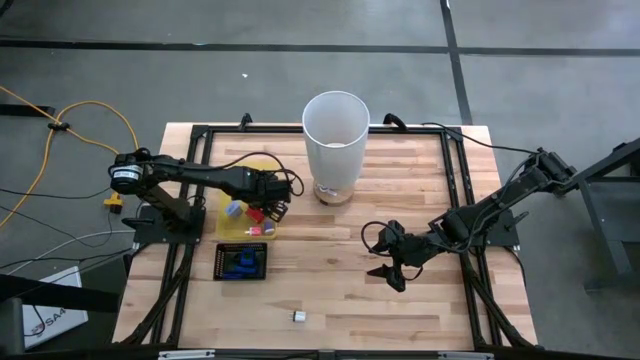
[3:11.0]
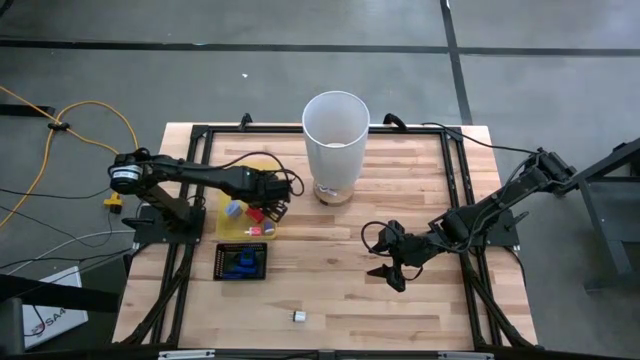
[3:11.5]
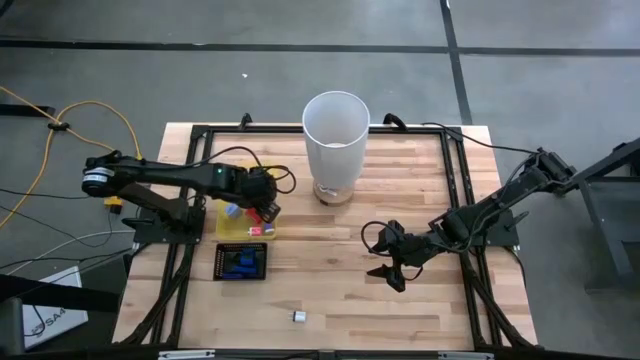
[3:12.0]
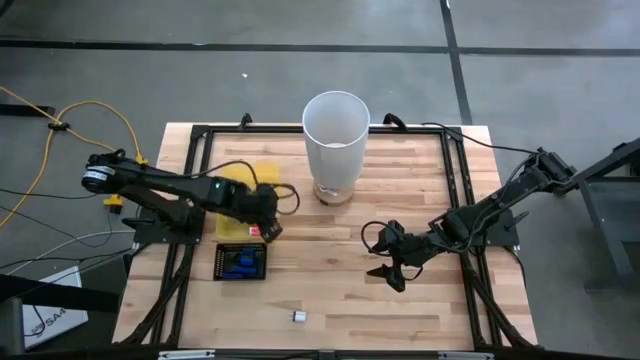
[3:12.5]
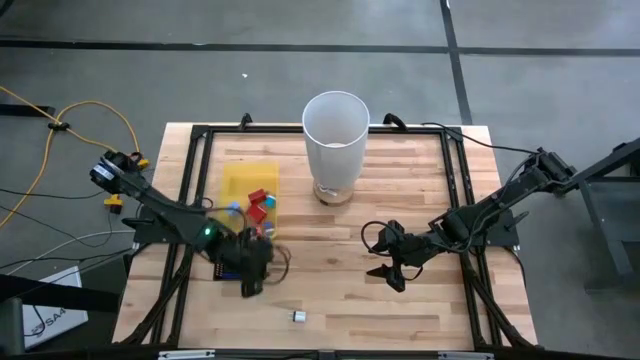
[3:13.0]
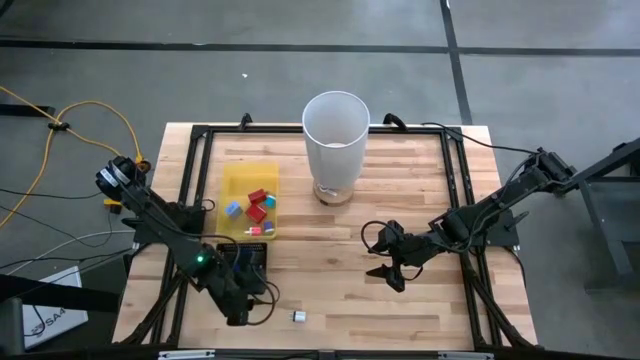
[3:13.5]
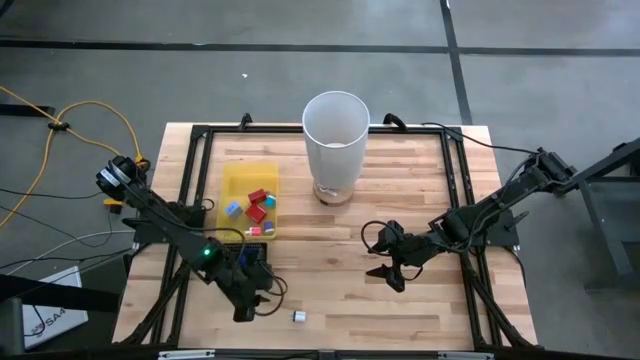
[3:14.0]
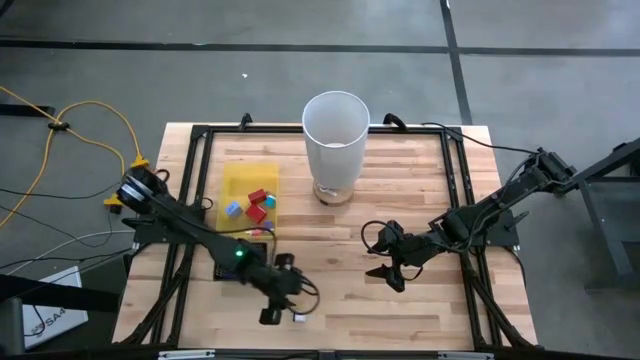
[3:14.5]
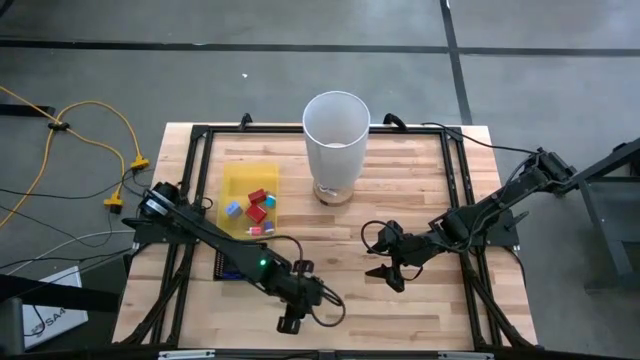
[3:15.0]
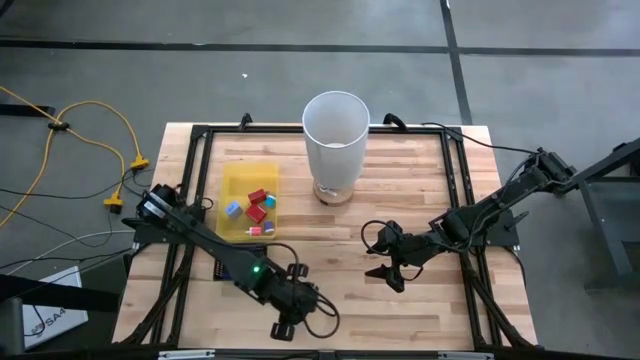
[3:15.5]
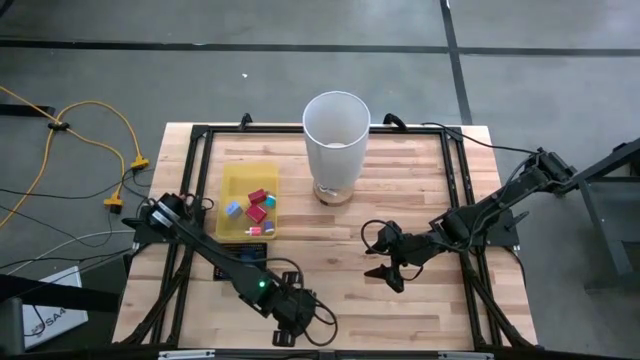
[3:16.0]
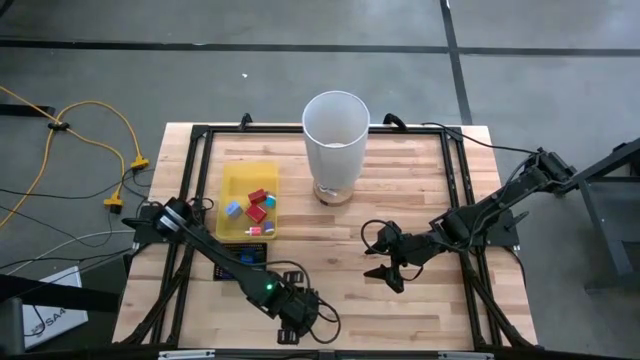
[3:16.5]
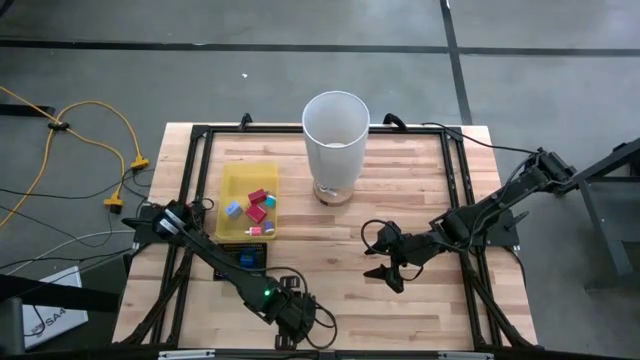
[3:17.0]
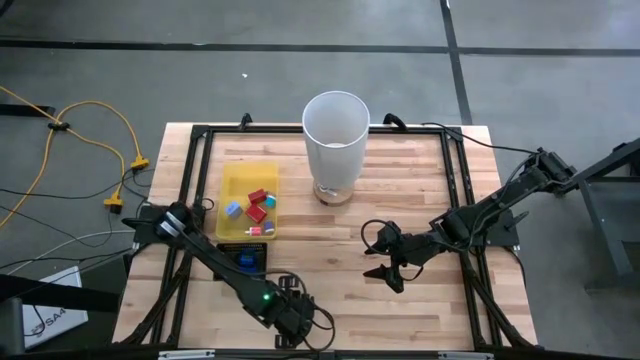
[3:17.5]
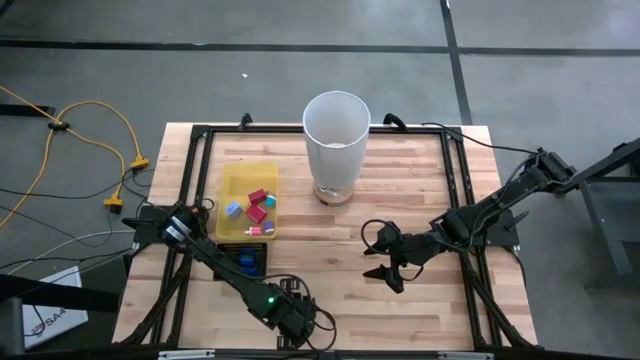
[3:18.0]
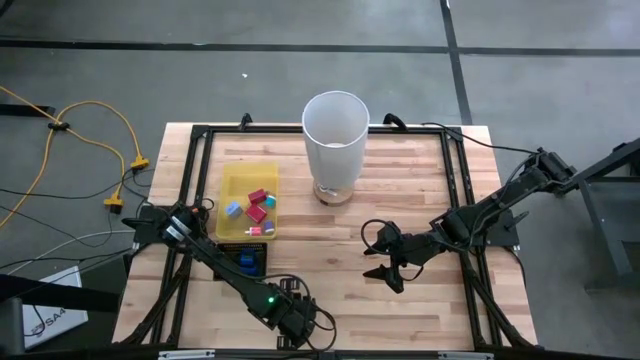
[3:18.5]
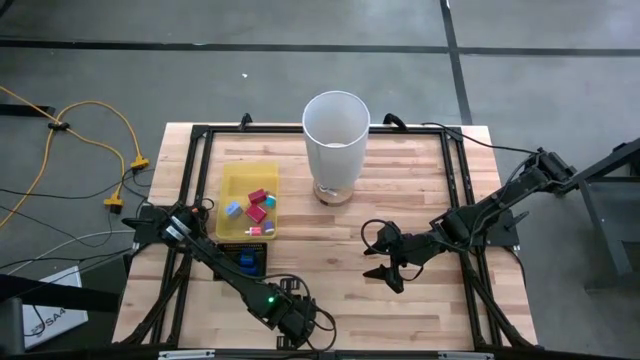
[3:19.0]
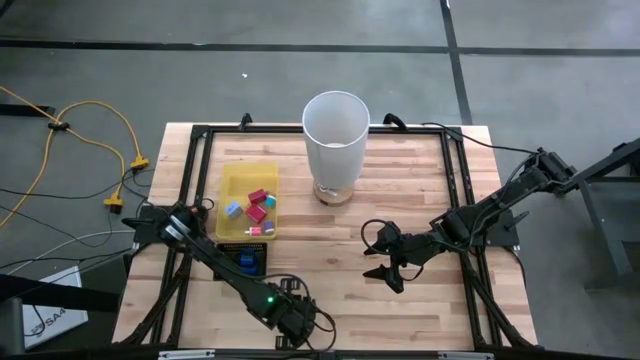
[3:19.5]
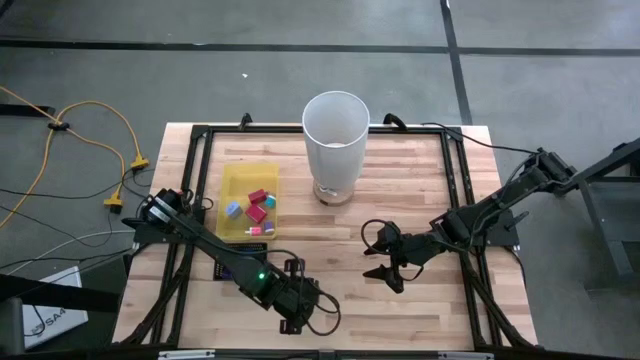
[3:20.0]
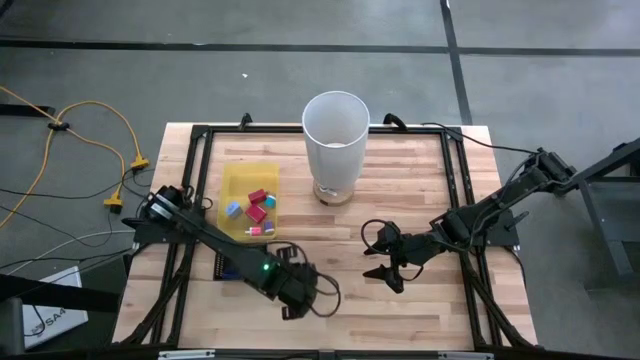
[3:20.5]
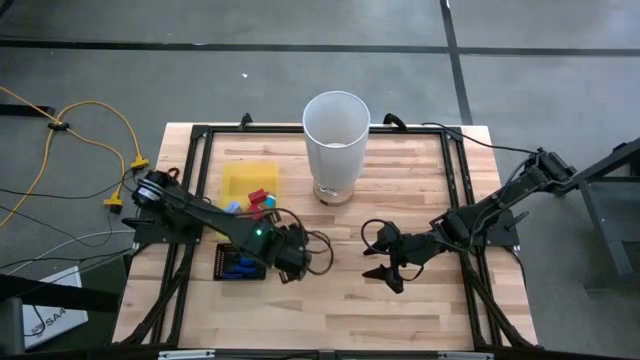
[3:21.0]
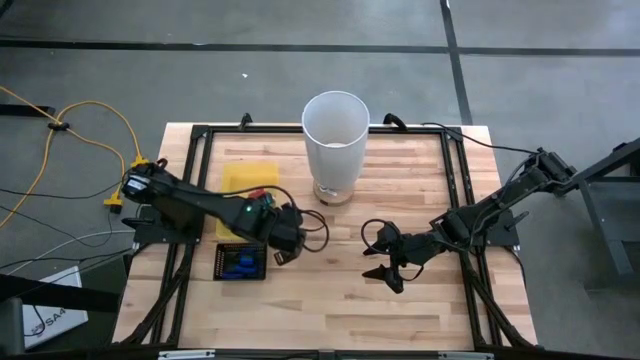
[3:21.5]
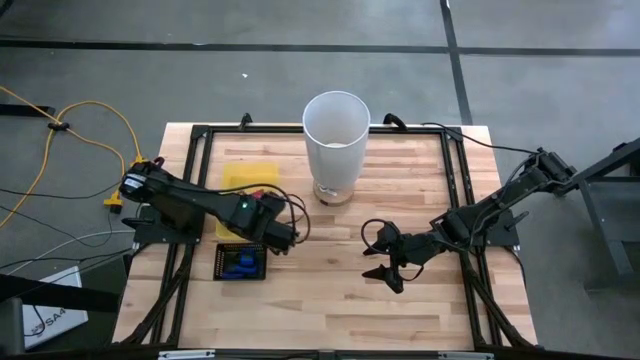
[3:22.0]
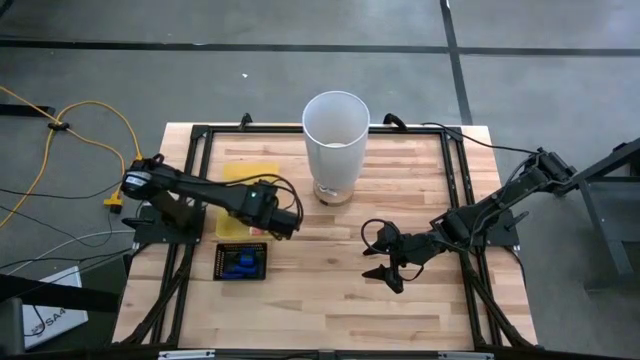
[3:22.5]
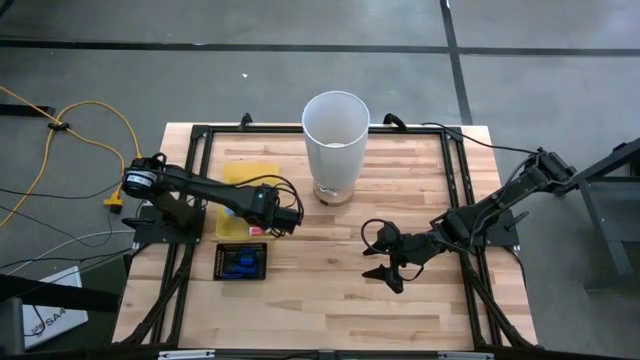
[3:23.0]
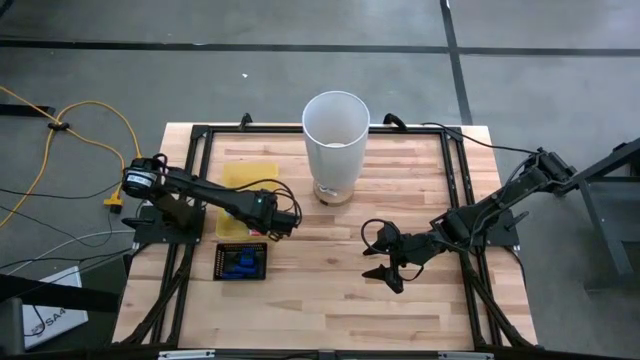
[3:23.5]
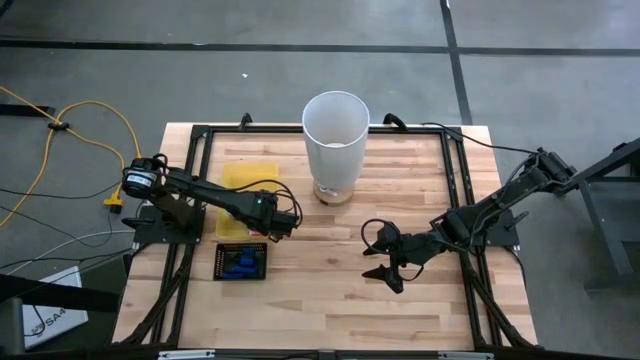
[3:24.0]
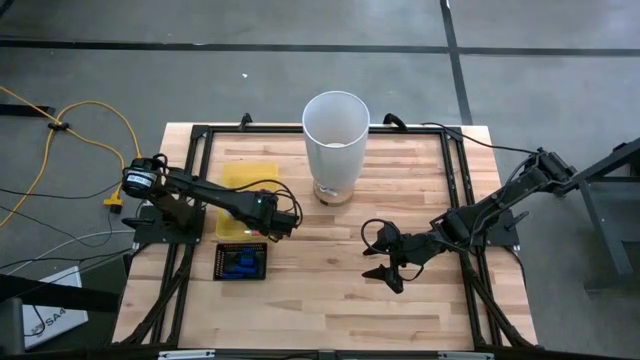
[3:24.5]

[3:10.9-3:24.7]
Task: Pick & Place Office items
Put the white charger adapter into the yellow bin

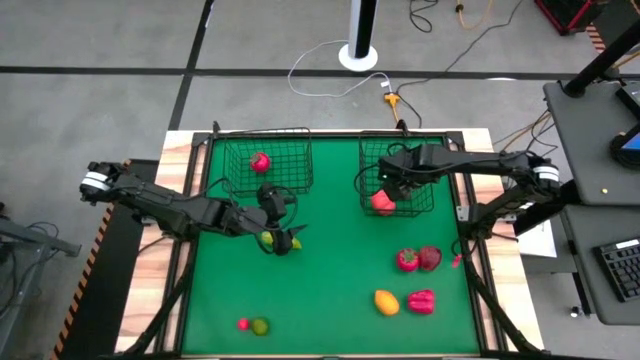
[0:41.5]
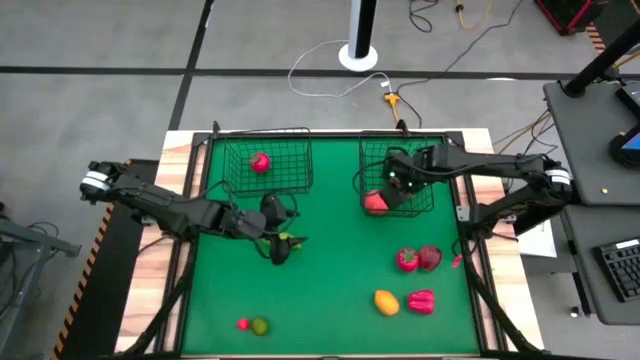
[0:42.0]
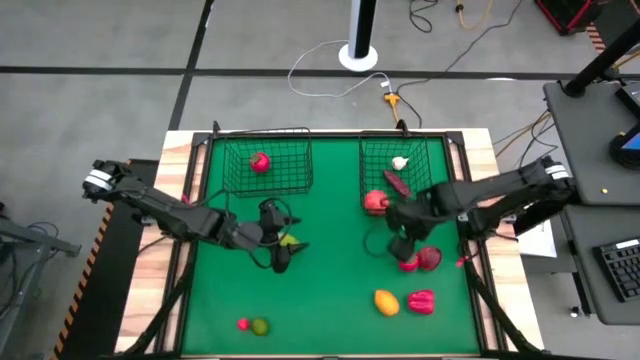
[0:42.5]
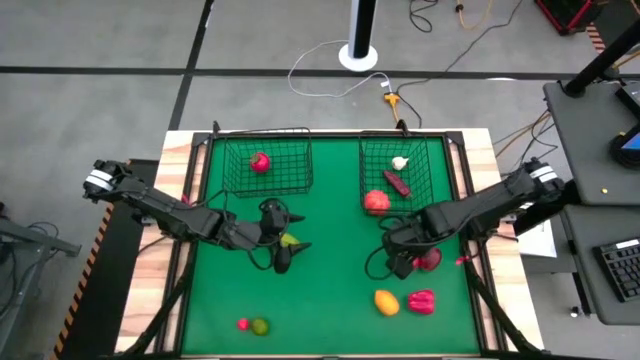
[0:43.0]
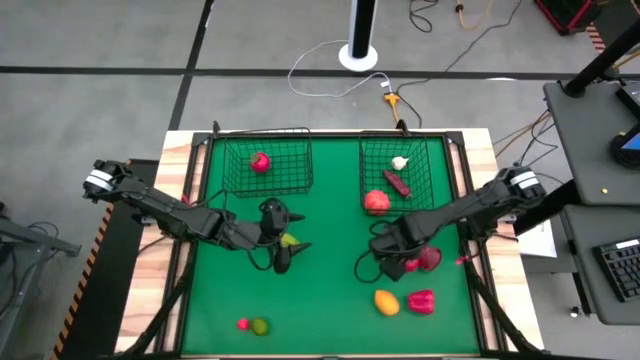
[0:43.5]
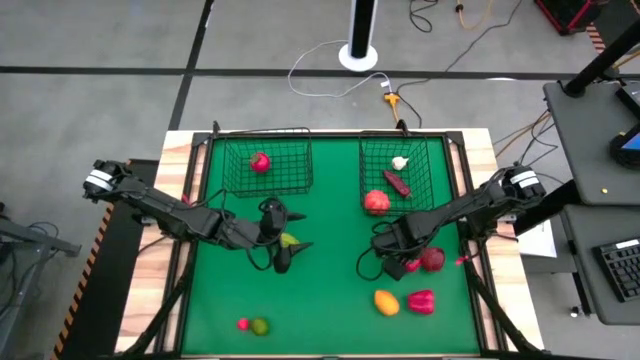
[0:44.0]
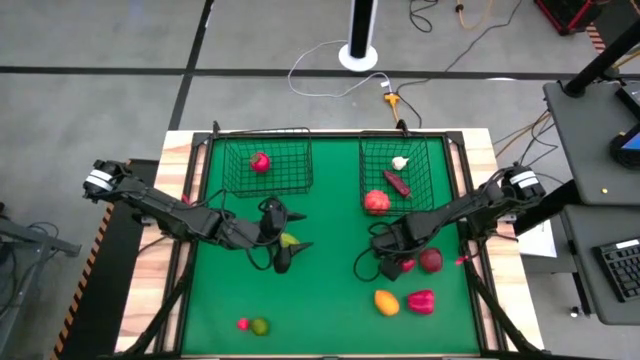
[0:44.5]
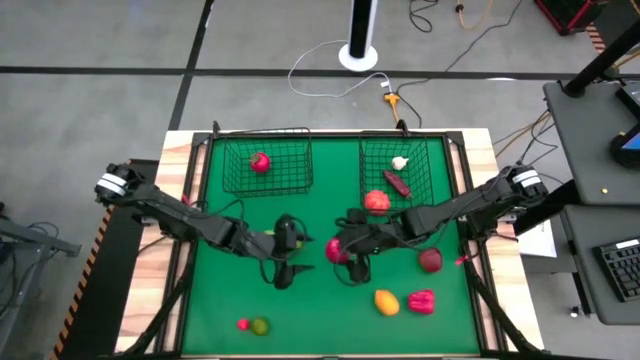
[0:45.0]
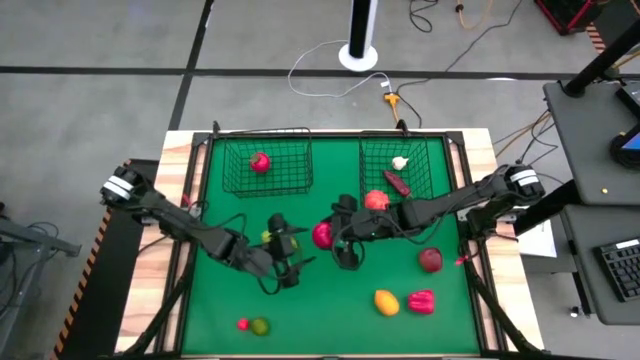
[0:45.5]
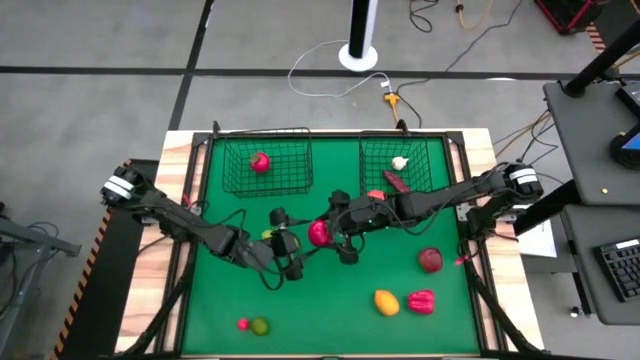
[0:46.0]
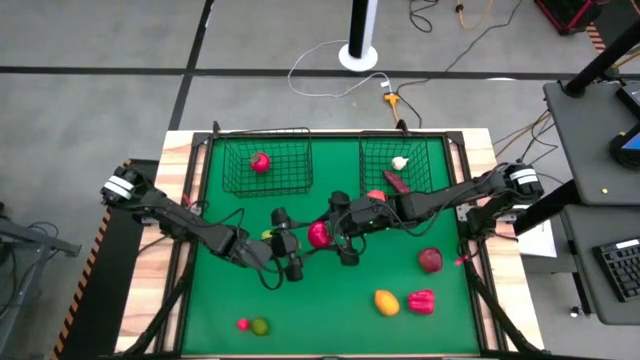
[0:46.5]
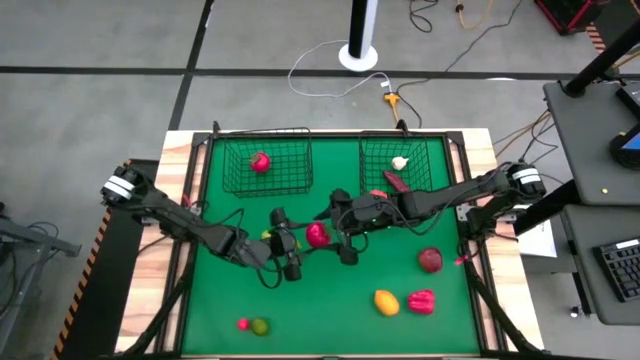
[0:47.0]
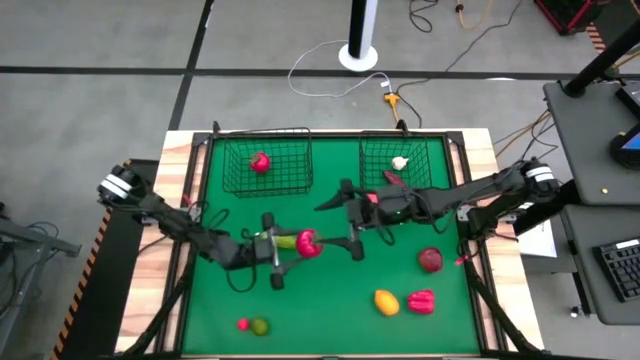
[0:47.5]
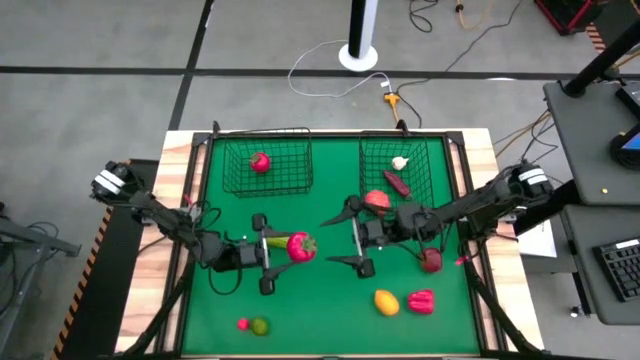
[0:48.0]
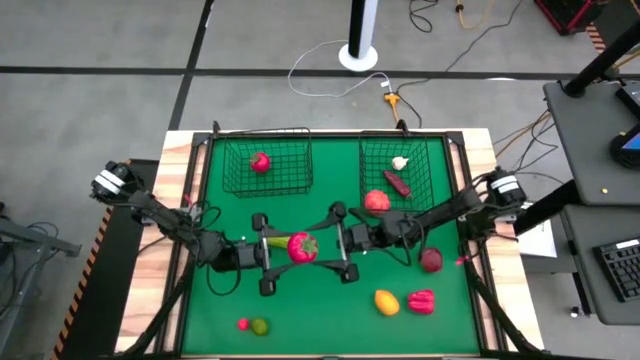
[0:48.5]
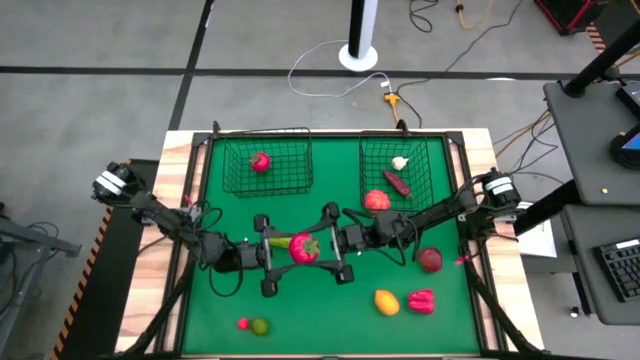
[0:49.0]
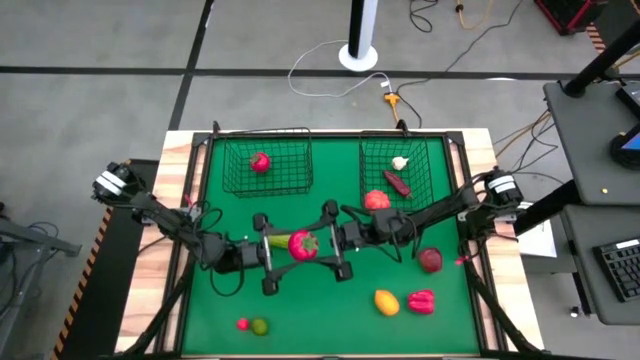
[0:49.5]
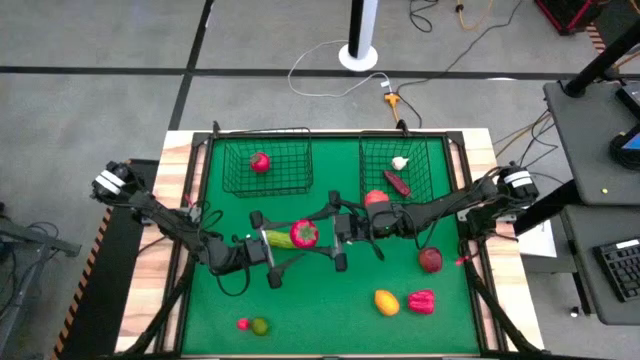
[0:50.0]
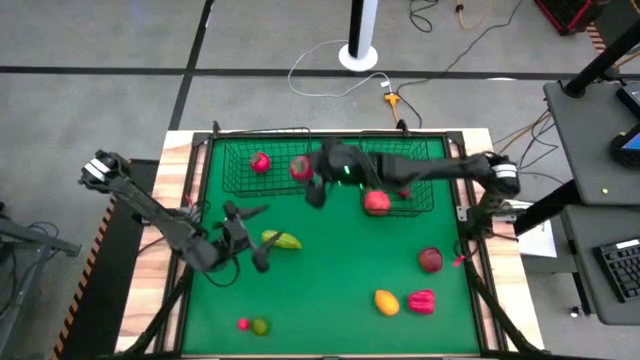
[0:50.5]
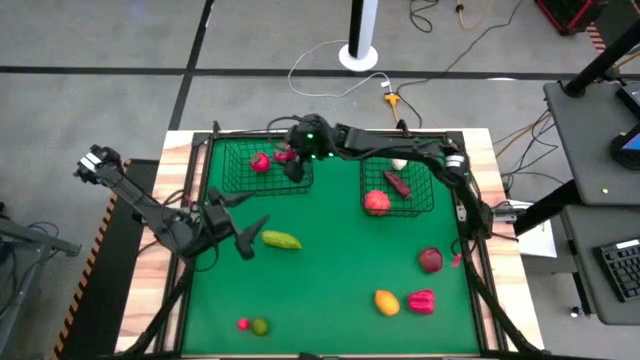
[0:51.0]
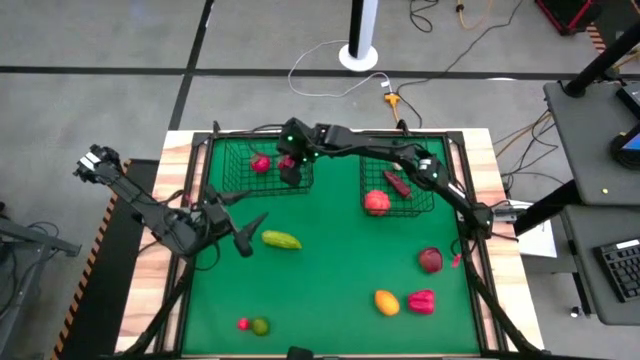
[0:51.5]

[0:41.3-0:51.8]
Task: Sort produce into baskets
Put the red tomato into the left wire basket
